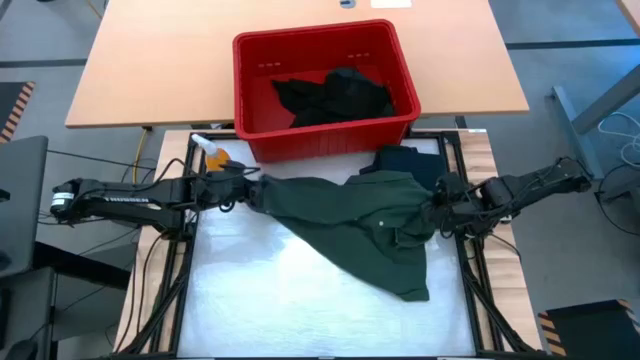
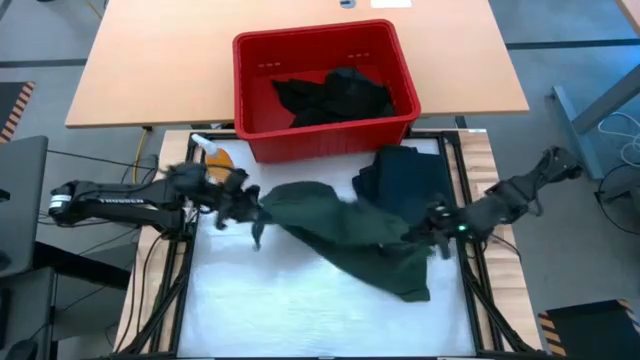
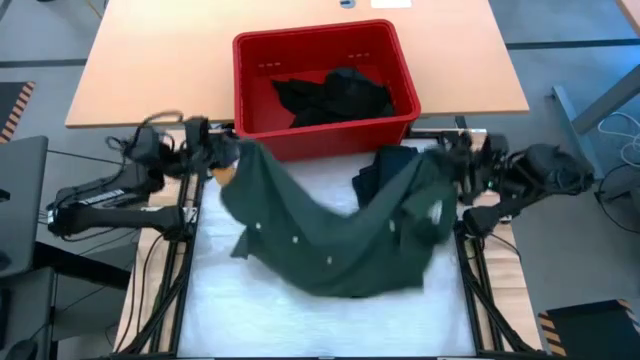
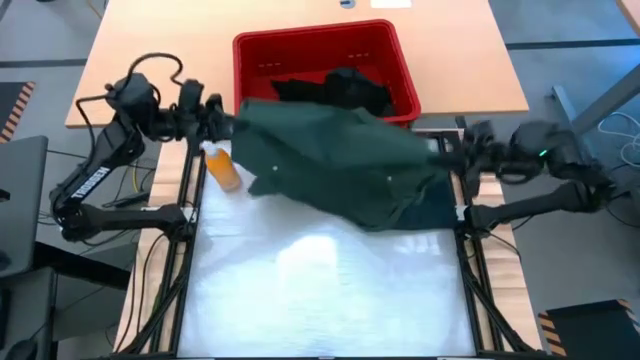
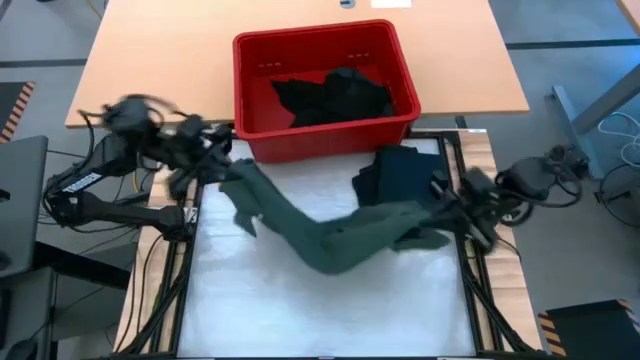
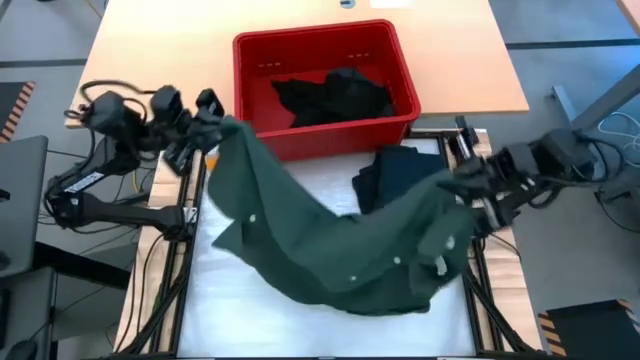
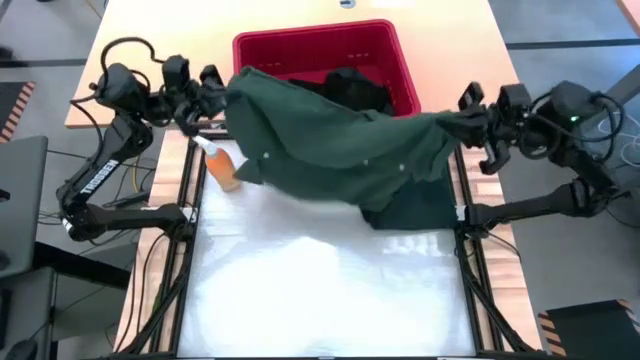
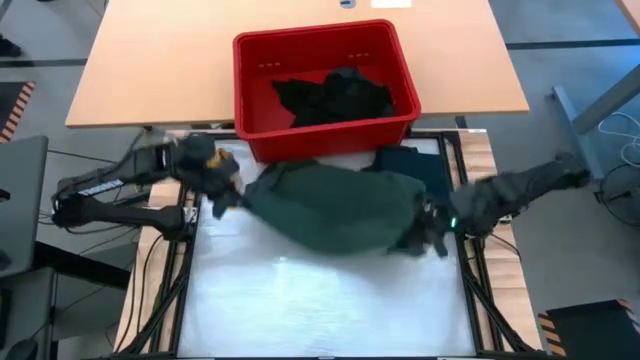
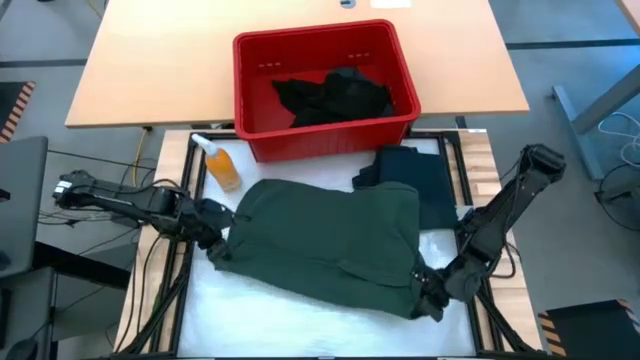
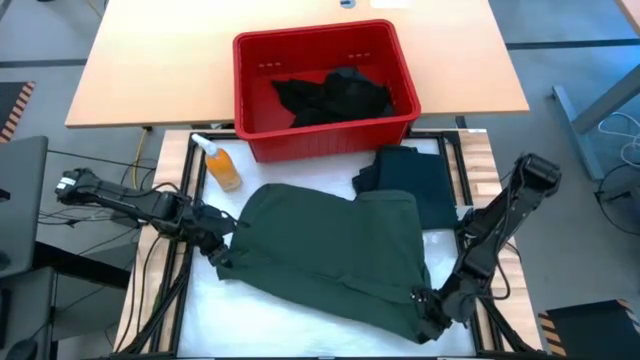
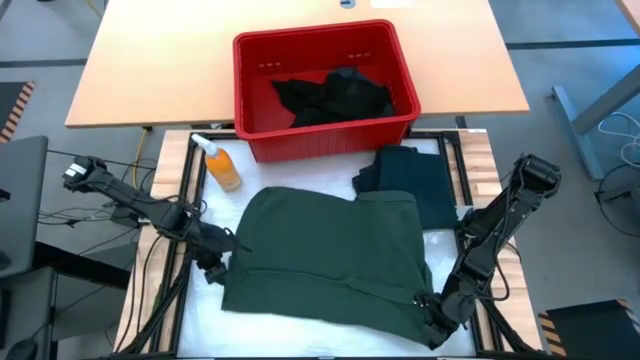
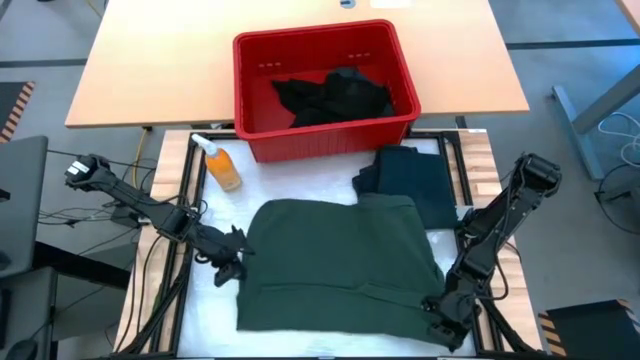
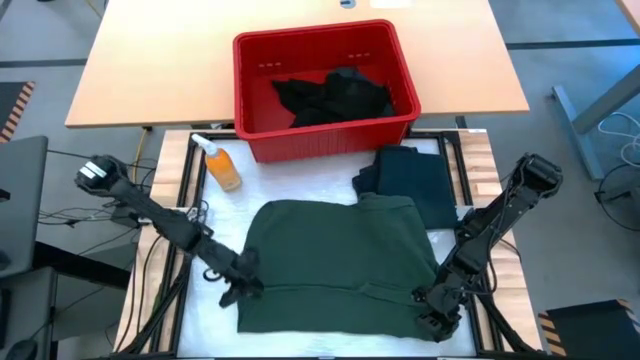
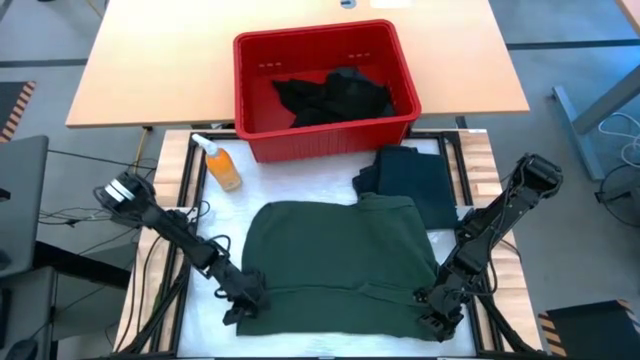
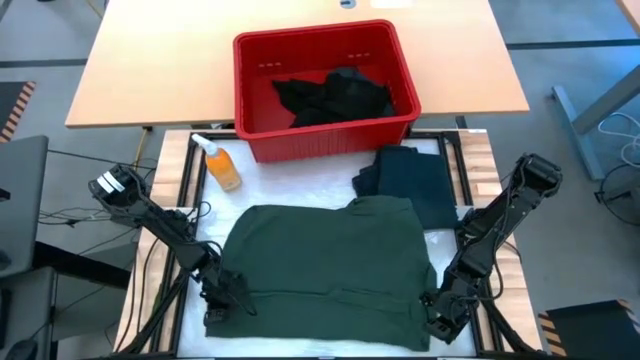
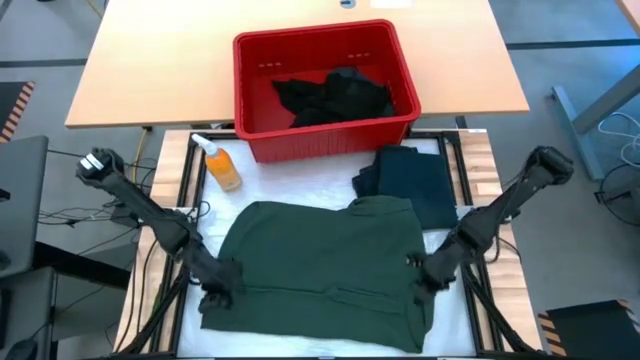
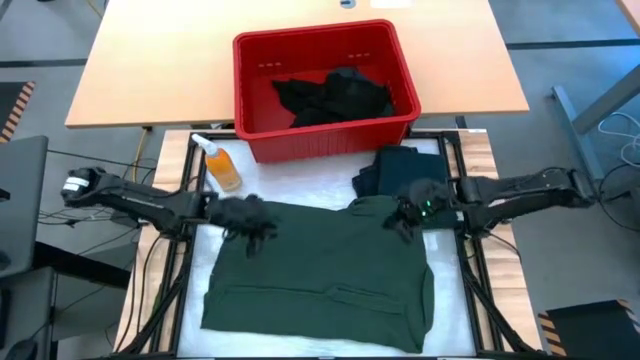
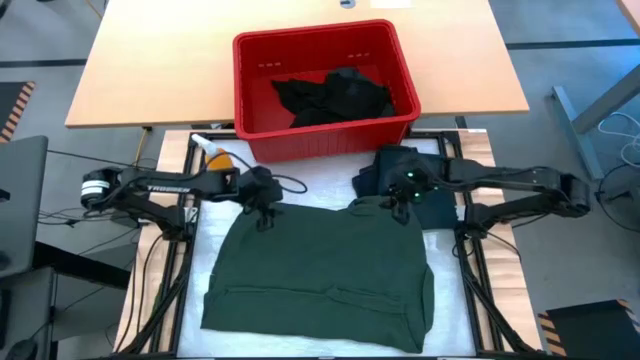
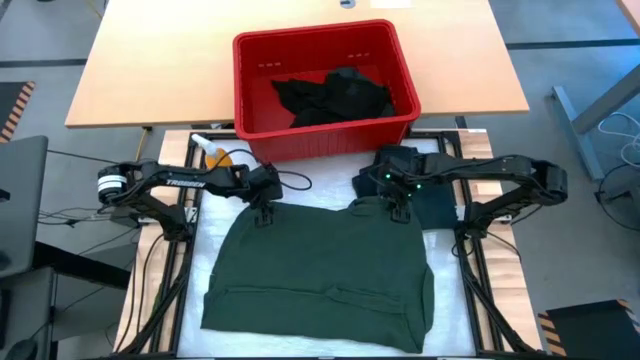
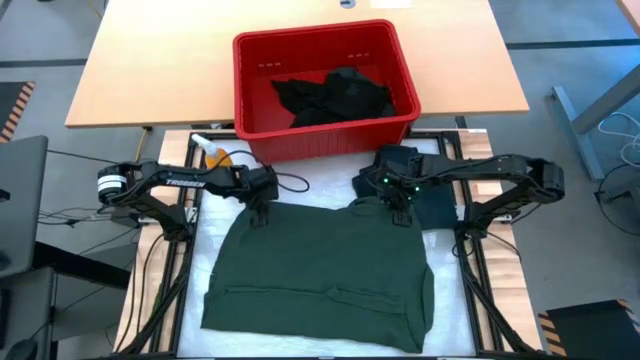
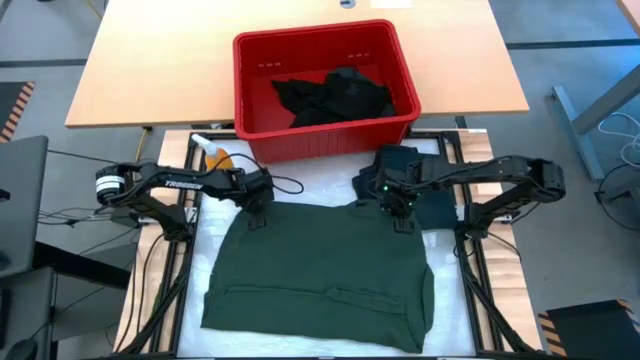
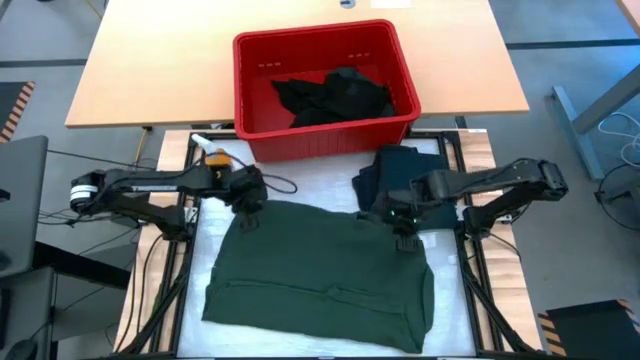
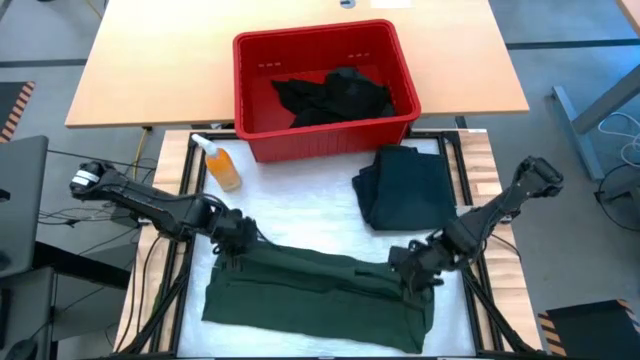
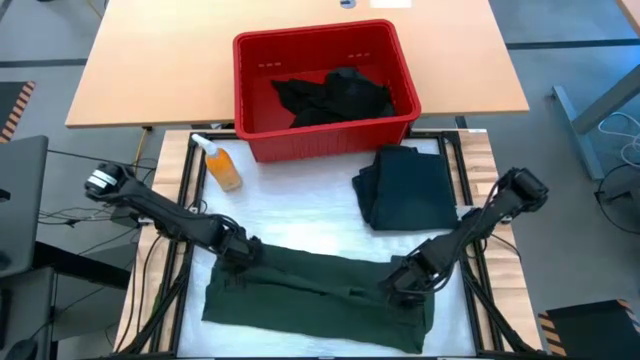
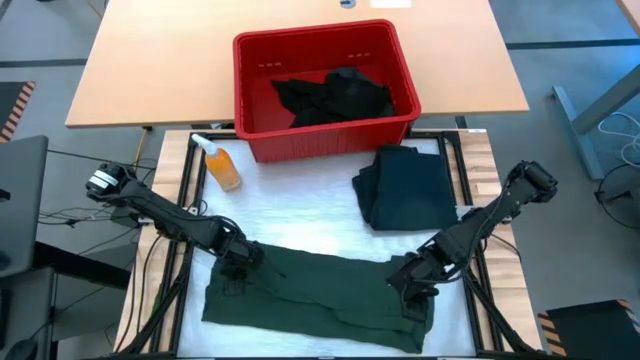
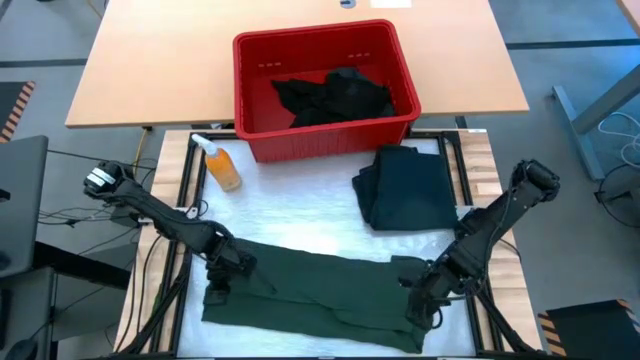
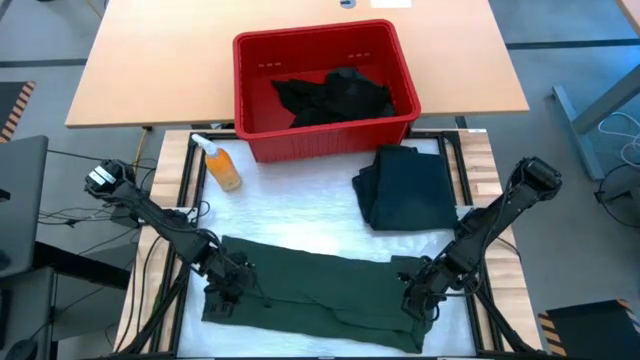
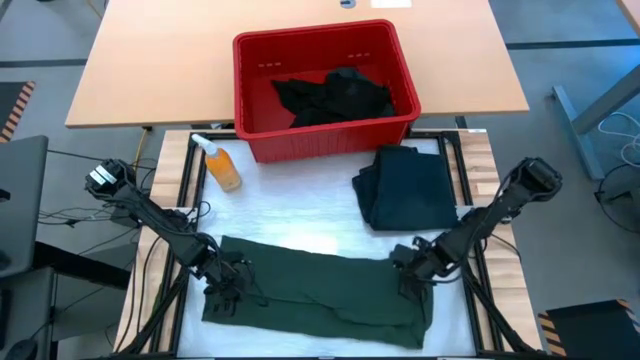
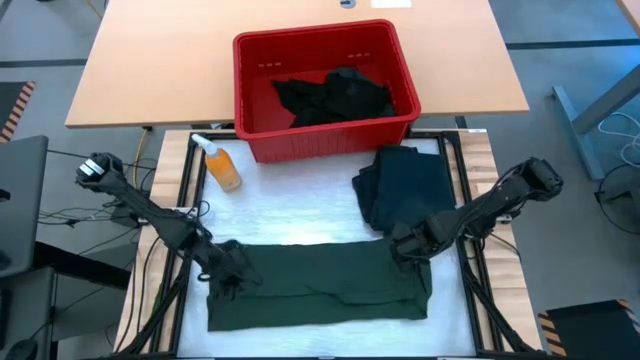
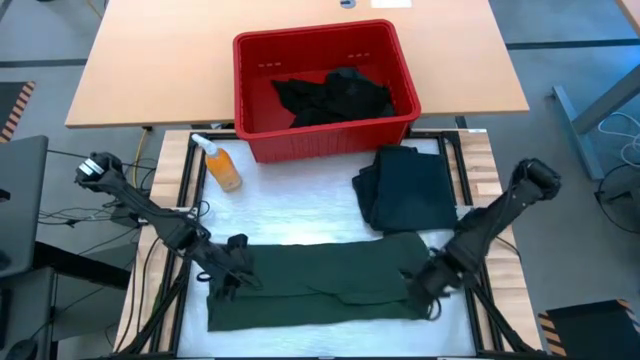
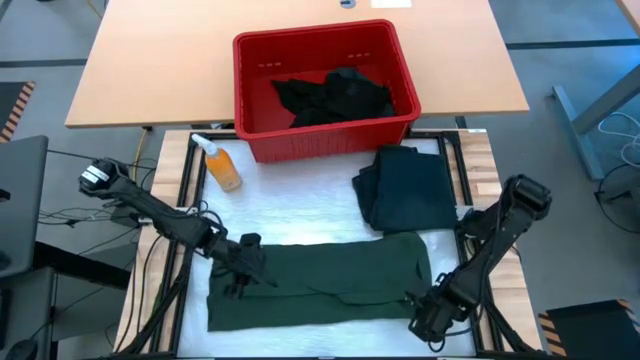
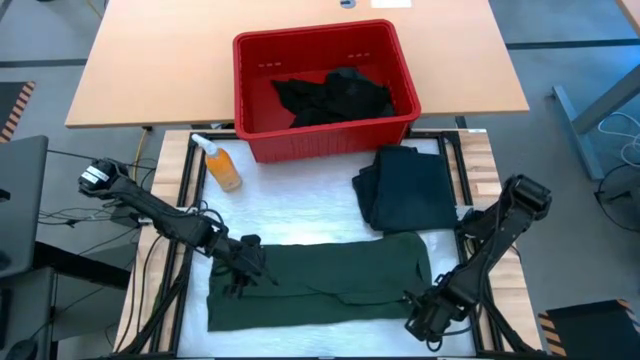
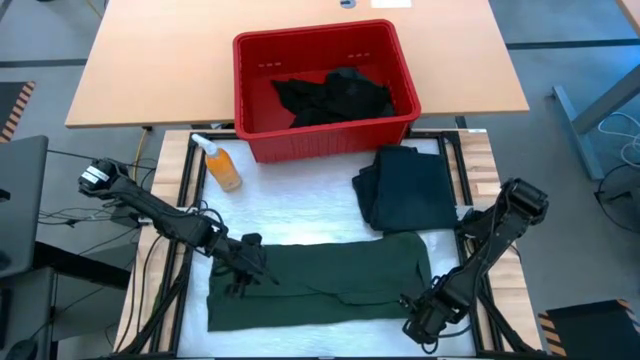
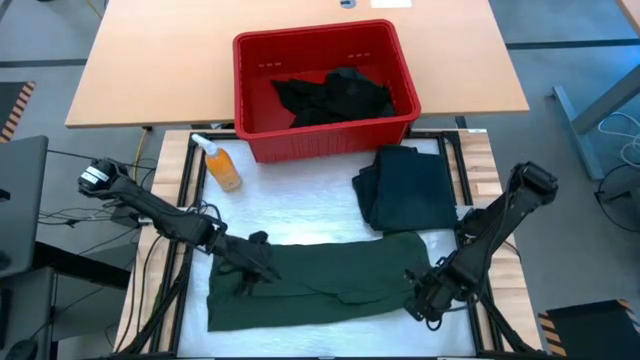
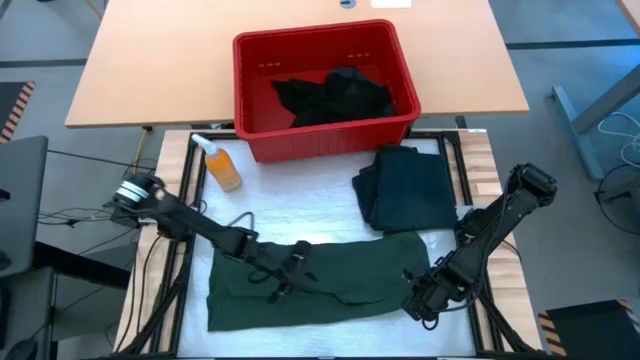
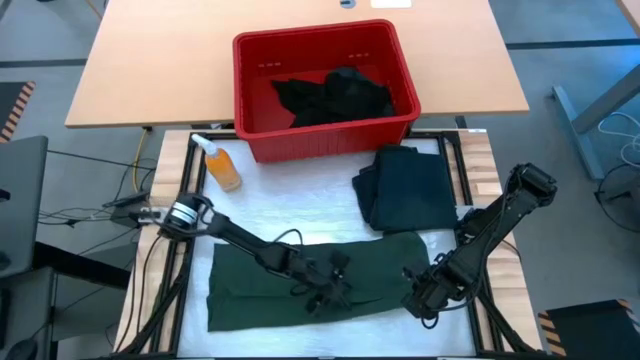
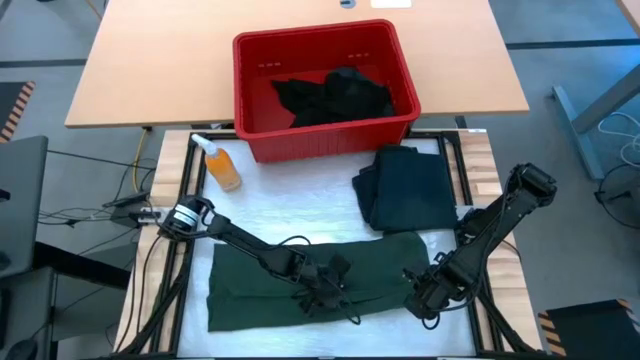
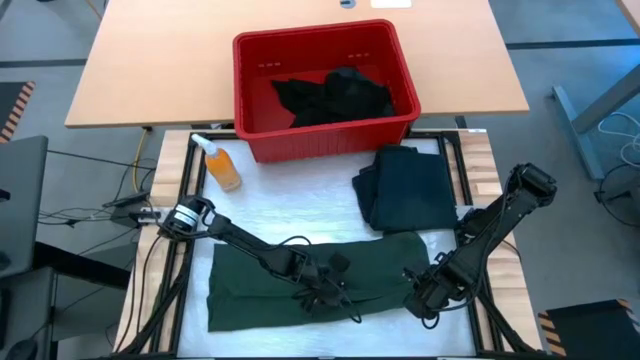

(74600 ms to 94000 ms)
Task: Fold laundry
Fold the green polo shirt
